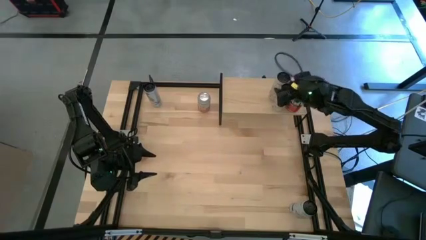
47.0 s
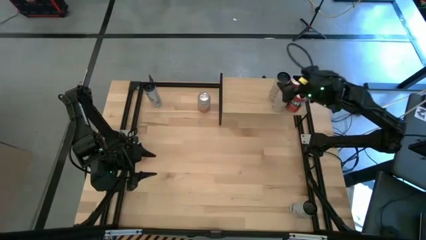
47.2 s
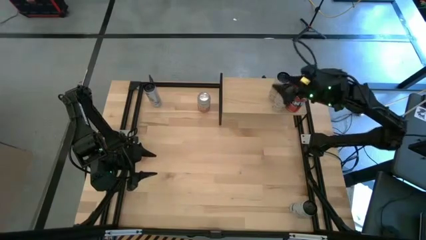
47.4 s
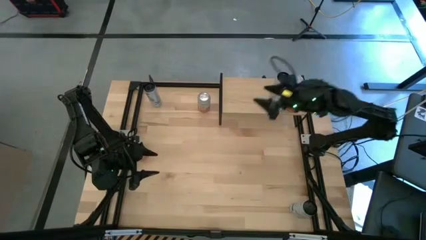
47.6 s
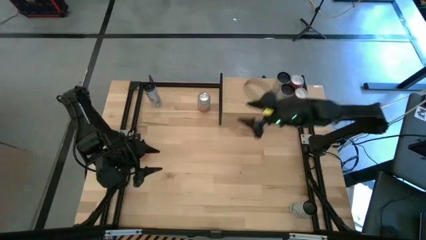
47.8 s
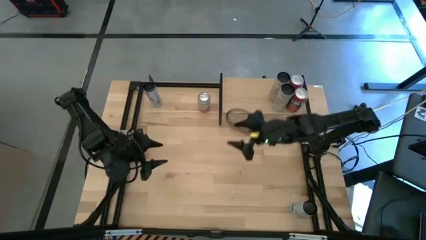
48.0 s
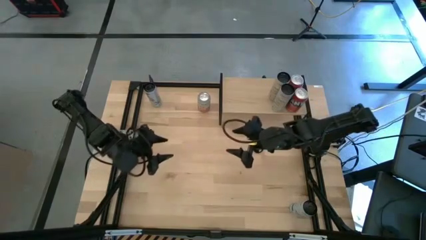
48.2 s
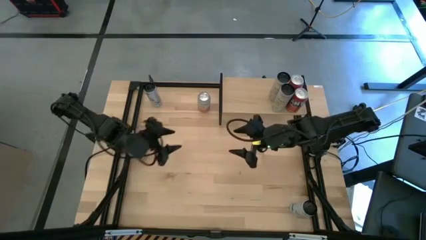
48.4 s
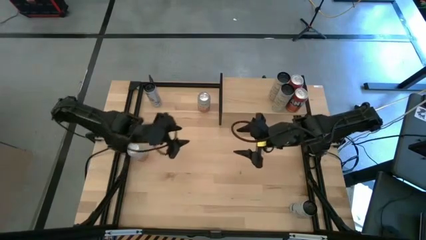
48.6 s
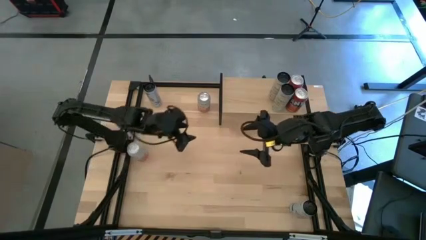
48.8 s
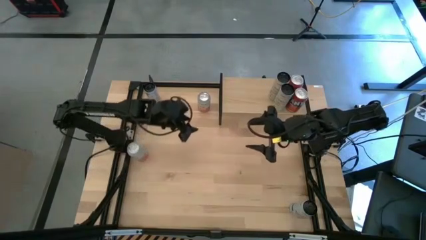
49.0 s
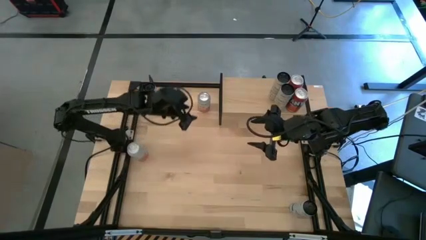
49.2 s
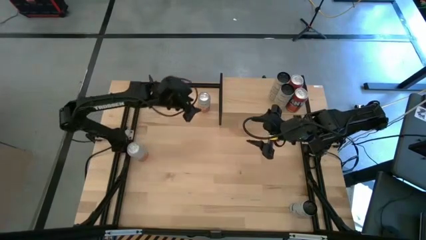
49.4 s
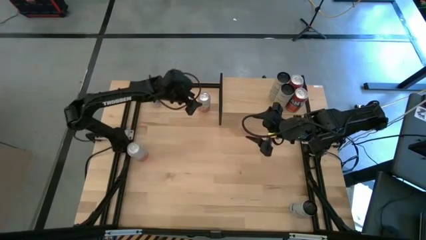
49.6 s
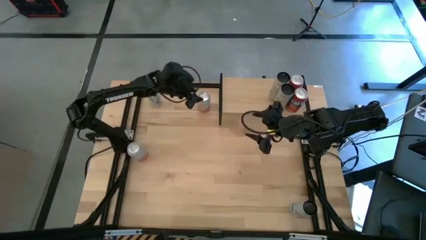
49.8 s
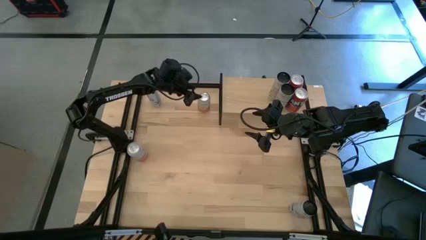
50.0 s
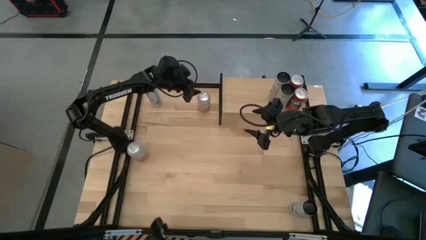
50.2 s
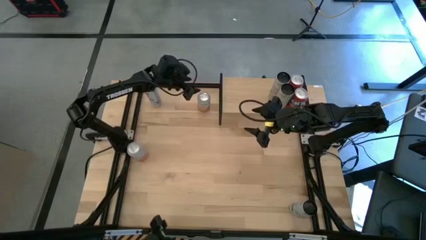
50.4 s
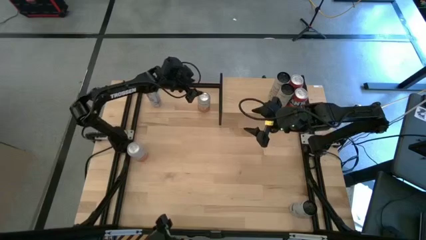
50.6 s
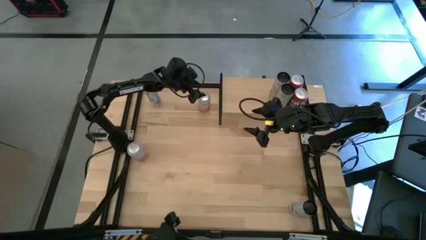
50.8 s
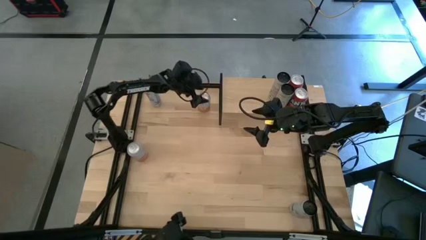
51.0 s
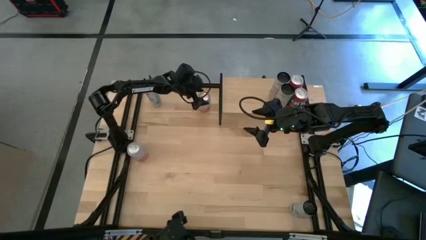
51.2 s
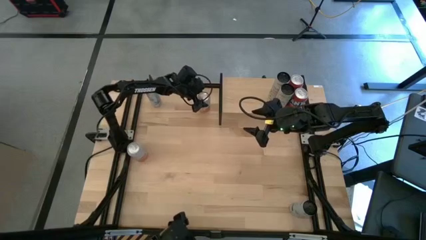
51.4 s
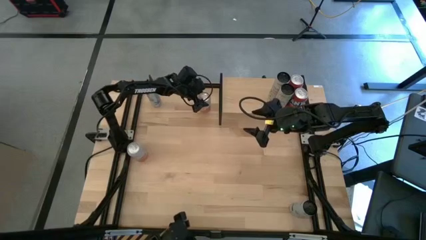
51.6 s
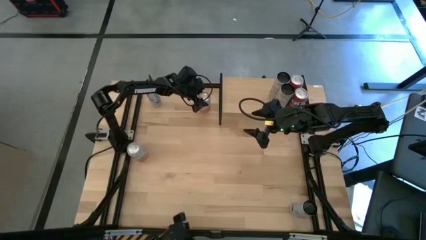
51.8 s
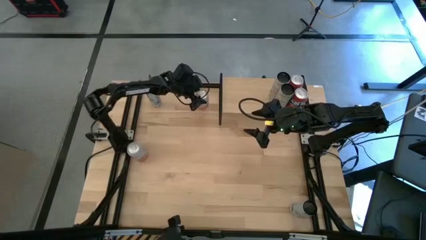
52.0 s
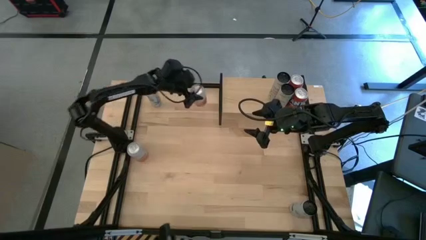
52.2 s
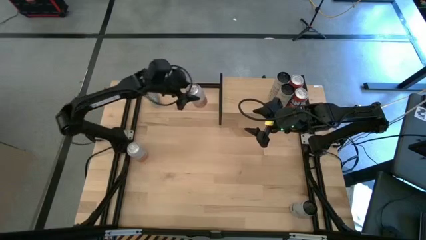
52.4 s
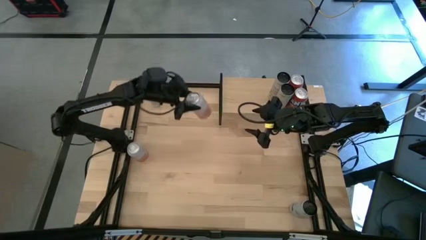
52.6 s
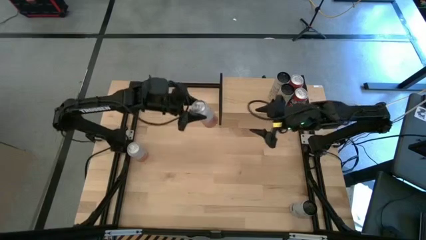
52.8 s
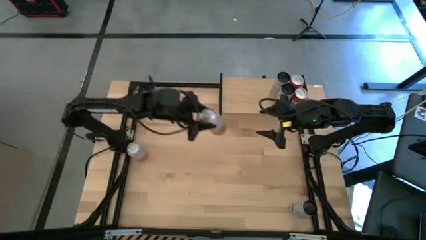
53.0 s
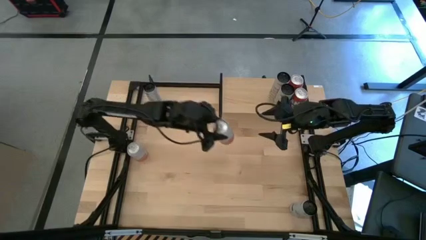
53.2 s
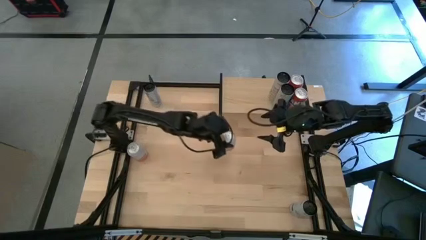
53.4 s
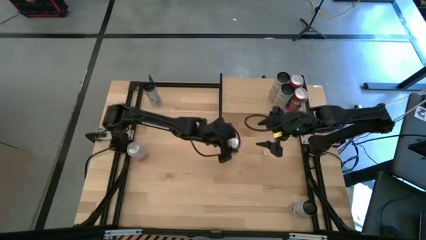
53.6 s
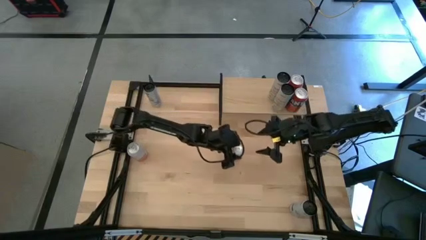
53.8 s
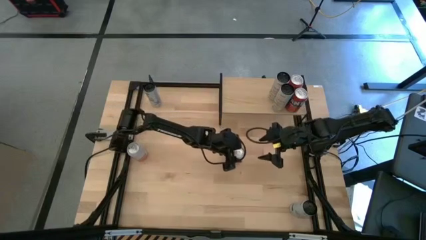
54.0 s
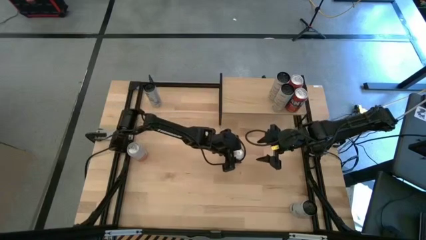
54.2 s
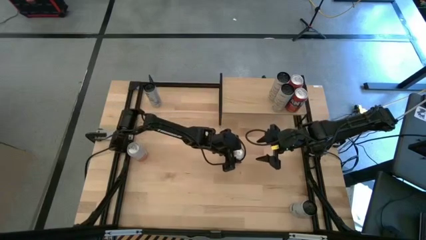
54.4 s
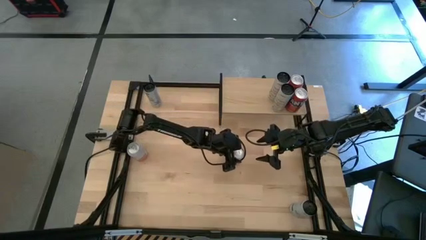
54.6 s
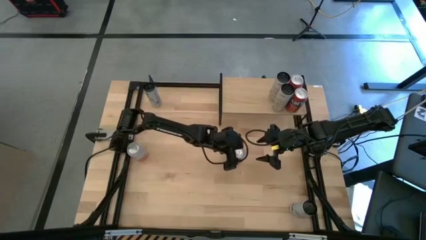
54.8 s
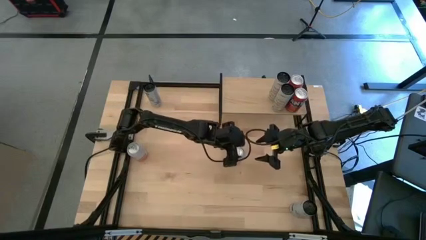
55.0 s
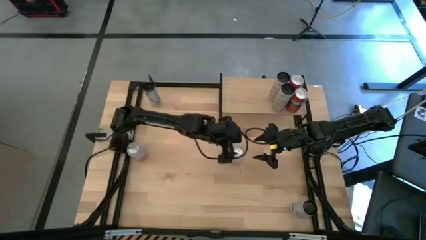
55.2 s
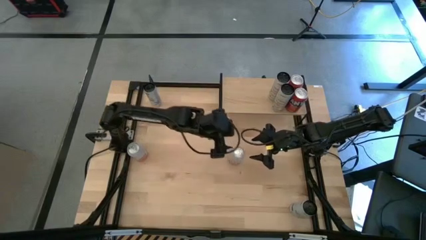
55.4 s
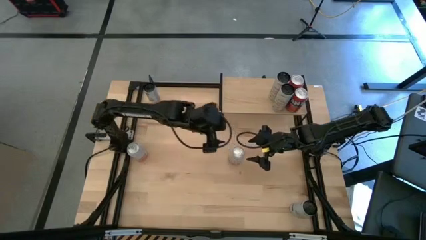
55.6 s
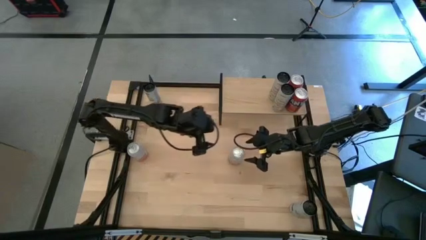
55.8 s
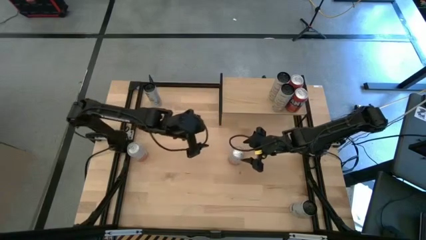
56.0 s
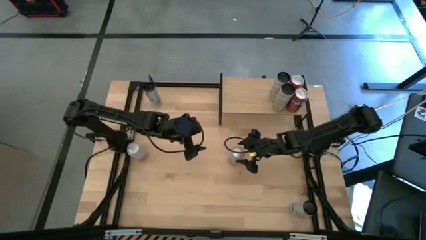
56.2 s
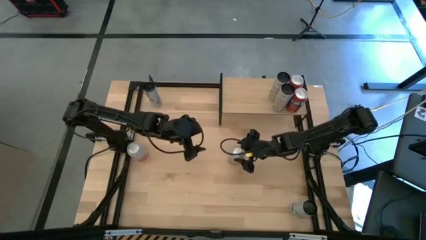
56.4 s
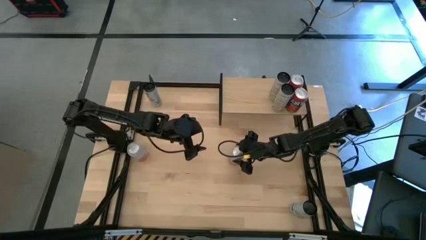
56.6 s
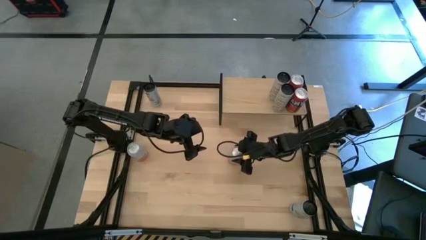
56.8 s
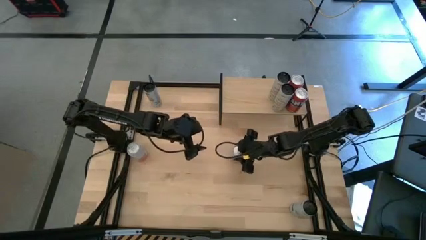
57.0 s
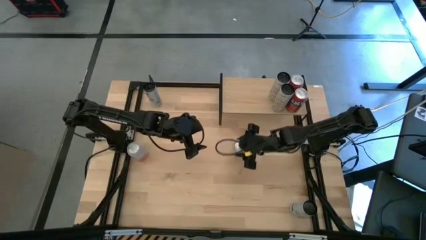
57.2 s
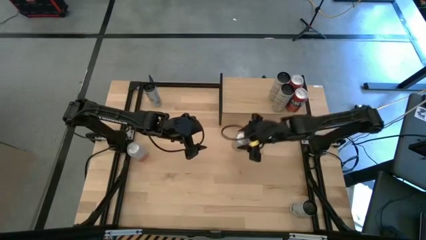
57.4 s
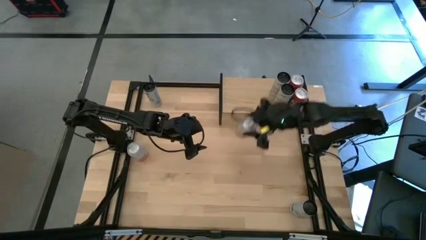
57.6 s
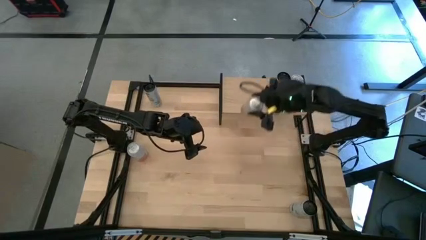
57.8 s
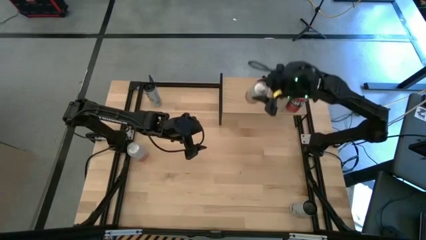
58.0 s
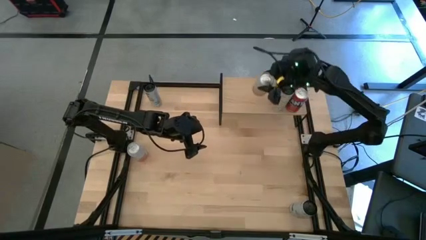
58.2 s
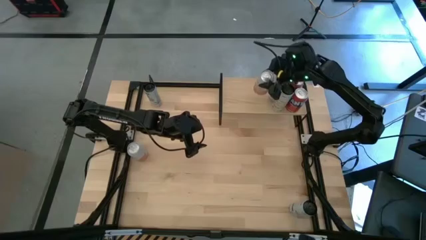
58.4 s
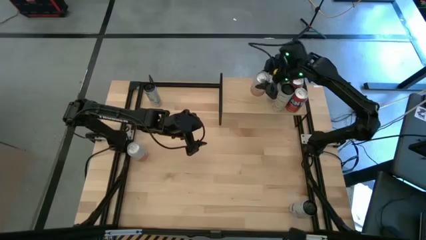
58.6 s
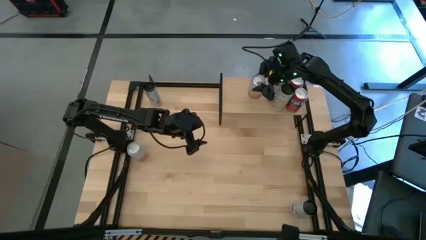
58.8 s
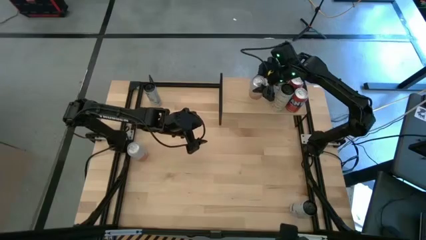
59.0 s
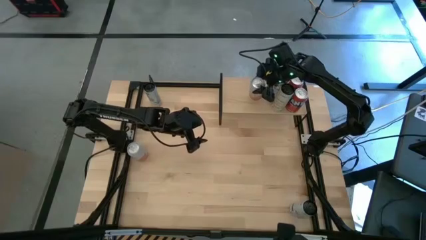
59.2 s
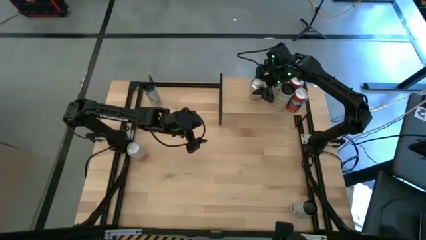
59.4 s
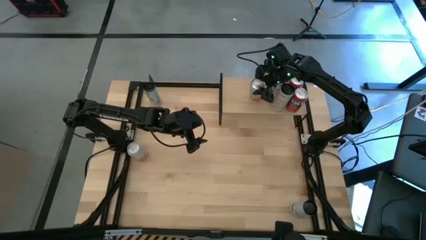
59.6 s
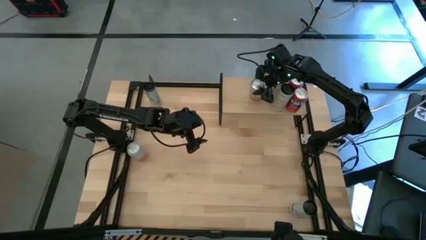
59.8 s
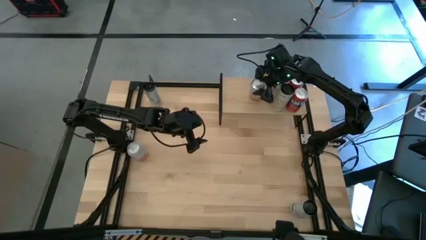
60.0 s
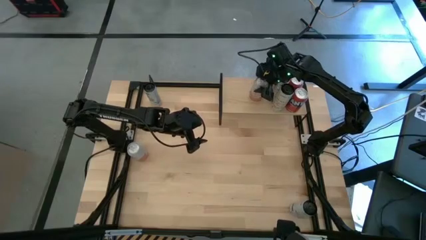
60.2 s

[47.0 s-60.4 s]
Task: Place canned beverage on shelf
Put the right orange soda can on the shelf
